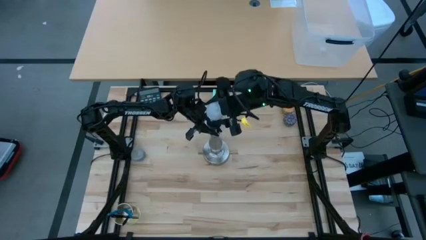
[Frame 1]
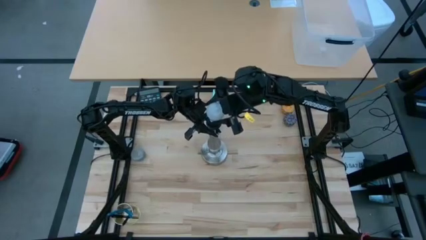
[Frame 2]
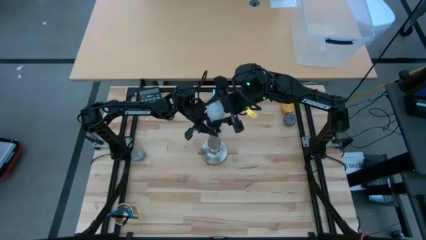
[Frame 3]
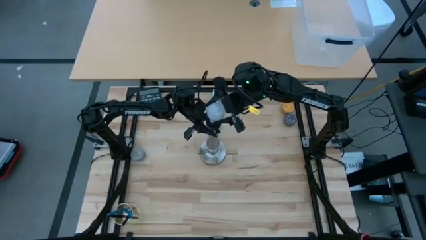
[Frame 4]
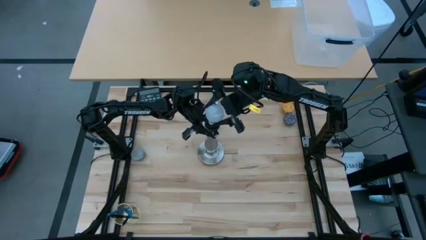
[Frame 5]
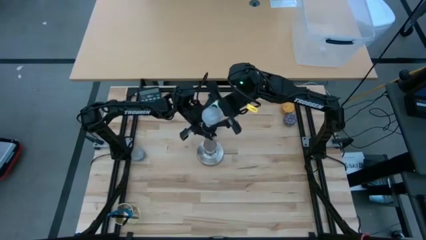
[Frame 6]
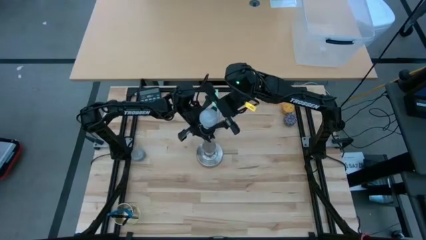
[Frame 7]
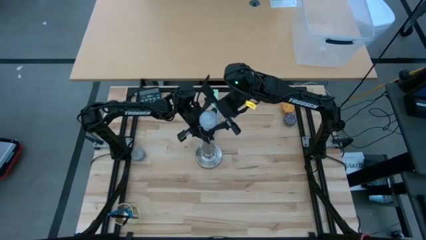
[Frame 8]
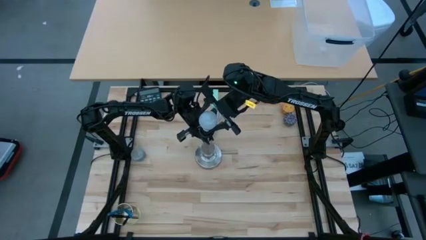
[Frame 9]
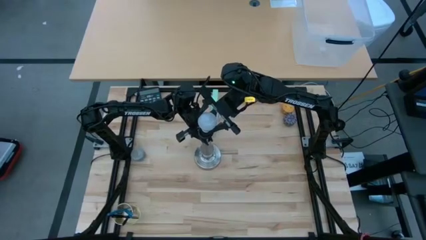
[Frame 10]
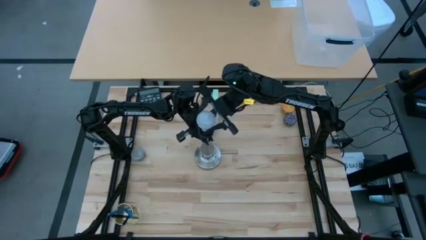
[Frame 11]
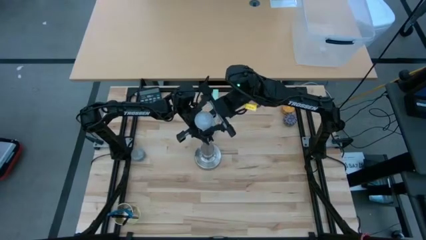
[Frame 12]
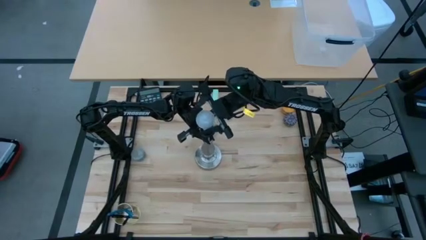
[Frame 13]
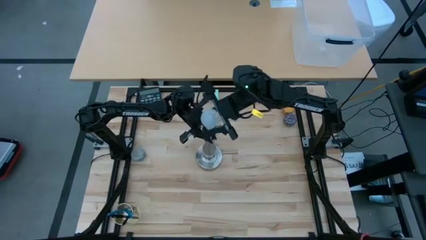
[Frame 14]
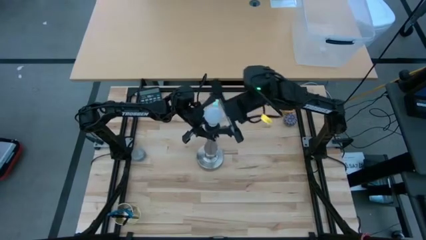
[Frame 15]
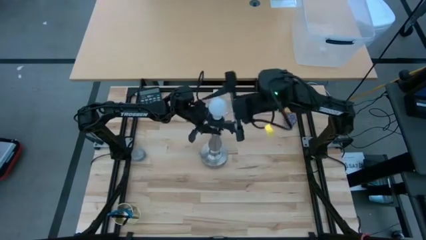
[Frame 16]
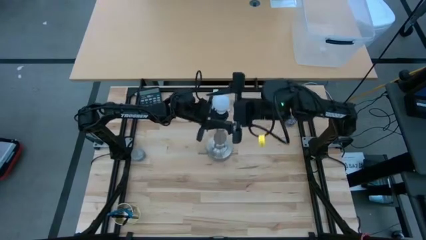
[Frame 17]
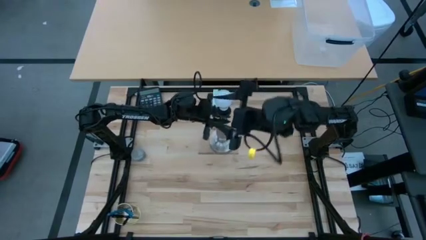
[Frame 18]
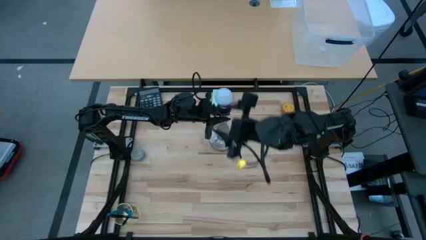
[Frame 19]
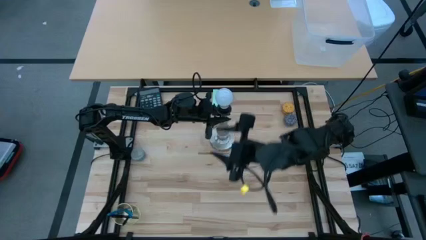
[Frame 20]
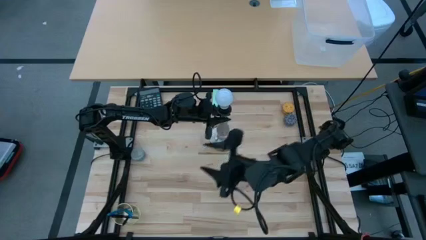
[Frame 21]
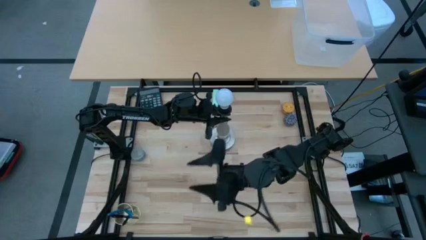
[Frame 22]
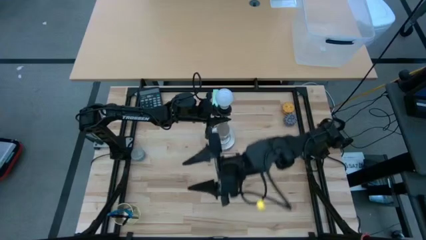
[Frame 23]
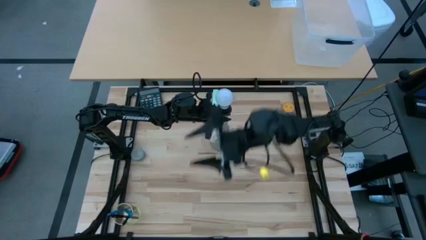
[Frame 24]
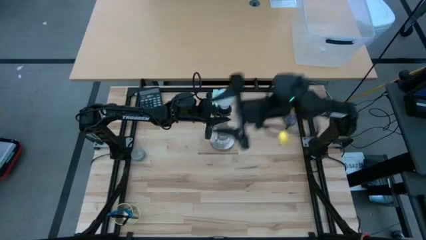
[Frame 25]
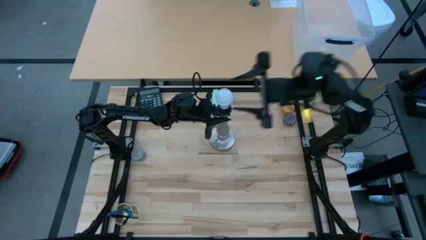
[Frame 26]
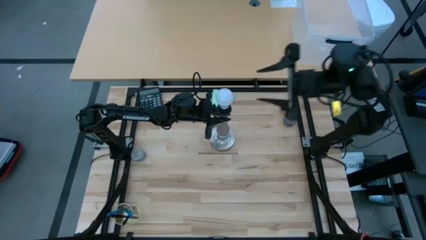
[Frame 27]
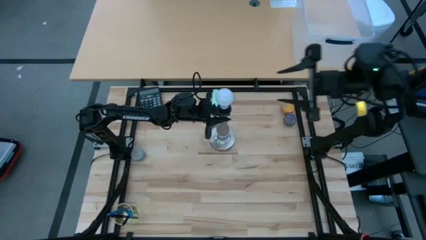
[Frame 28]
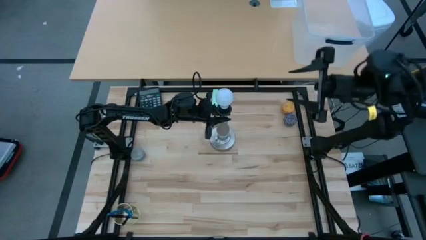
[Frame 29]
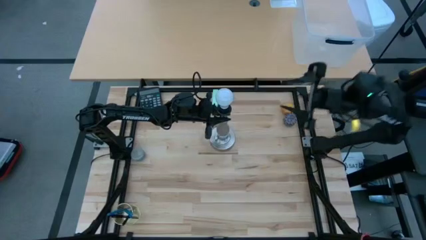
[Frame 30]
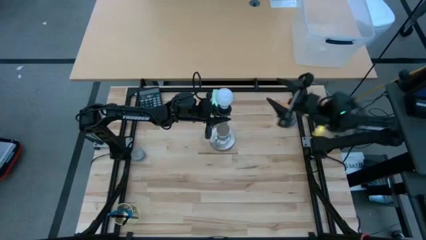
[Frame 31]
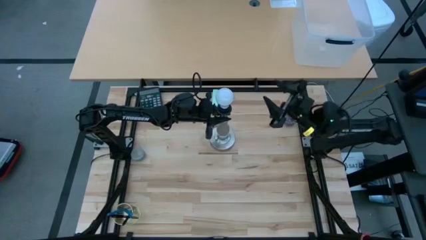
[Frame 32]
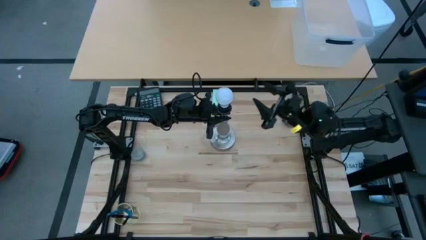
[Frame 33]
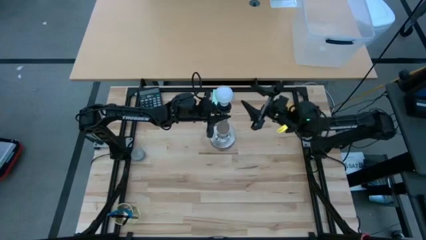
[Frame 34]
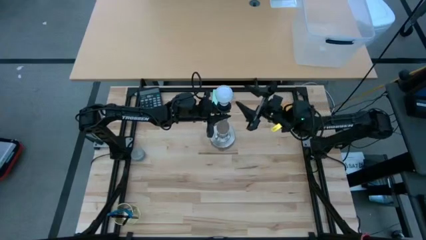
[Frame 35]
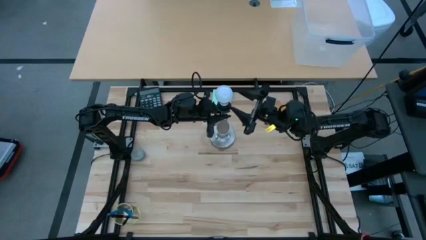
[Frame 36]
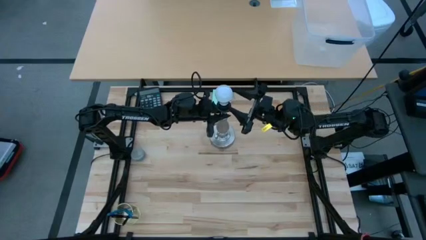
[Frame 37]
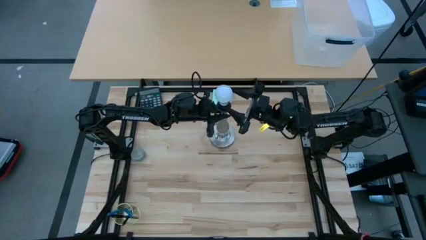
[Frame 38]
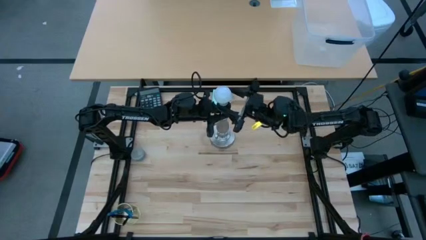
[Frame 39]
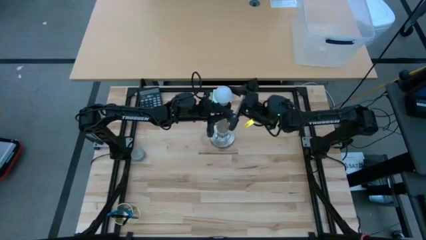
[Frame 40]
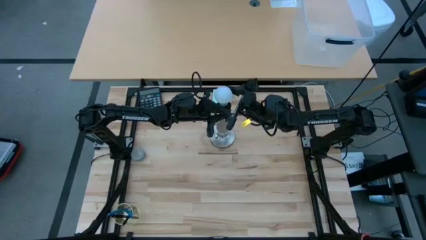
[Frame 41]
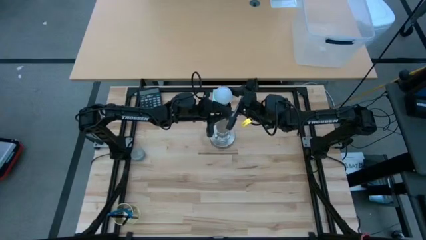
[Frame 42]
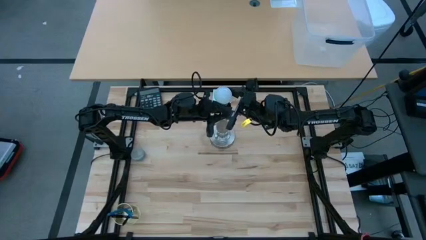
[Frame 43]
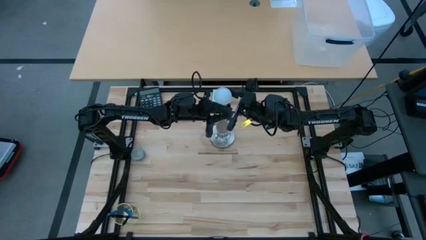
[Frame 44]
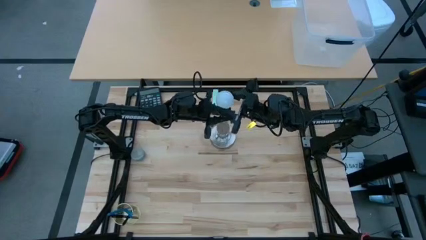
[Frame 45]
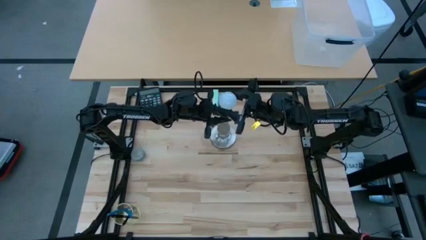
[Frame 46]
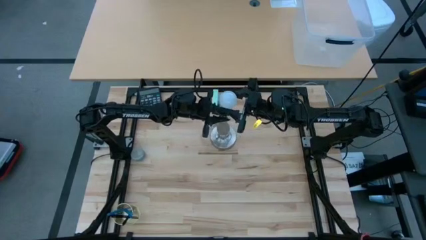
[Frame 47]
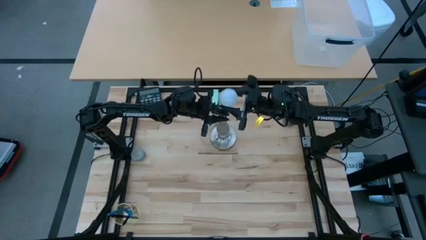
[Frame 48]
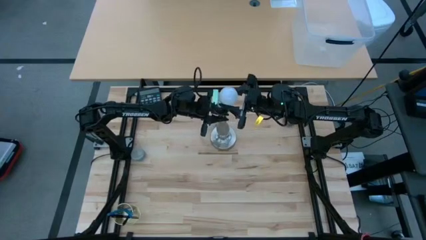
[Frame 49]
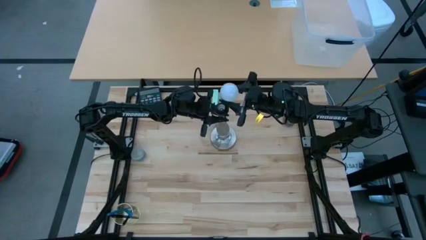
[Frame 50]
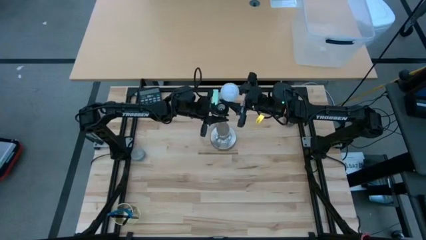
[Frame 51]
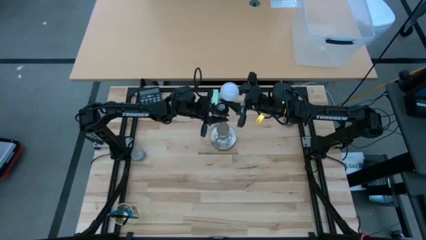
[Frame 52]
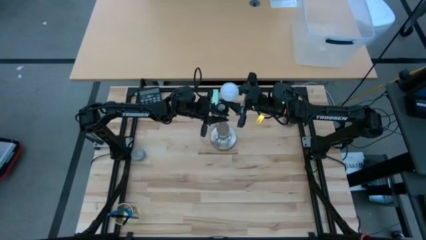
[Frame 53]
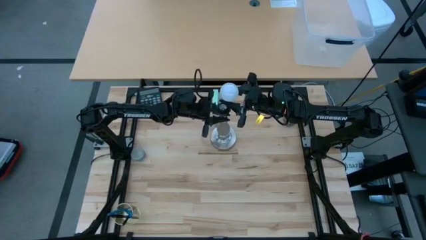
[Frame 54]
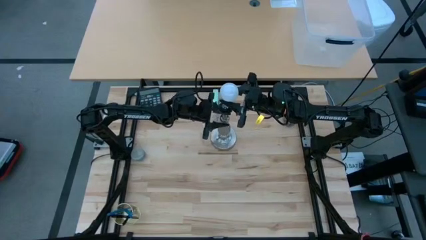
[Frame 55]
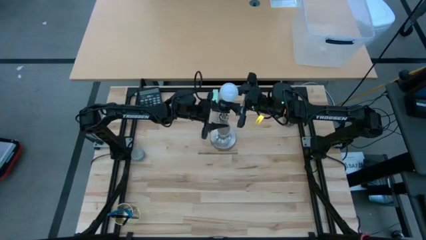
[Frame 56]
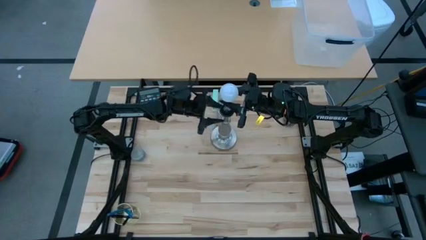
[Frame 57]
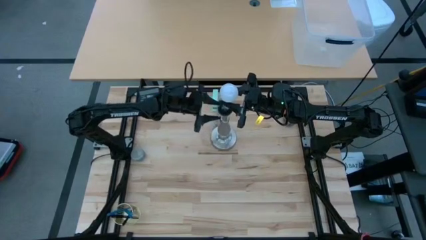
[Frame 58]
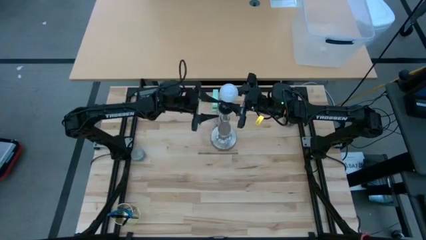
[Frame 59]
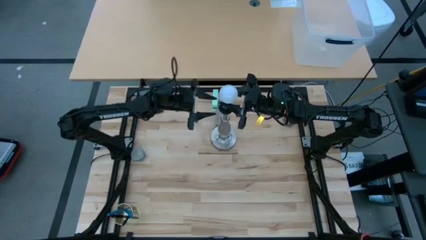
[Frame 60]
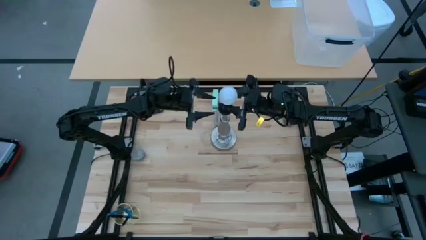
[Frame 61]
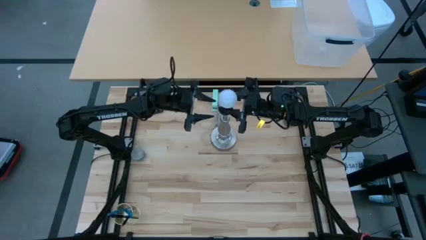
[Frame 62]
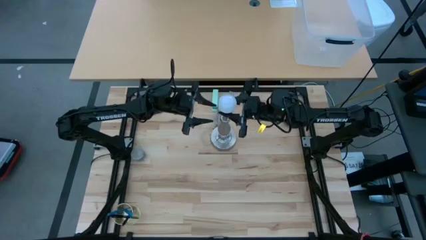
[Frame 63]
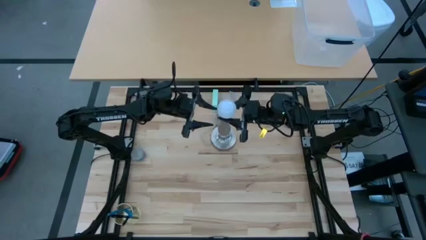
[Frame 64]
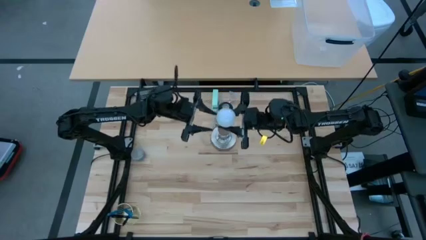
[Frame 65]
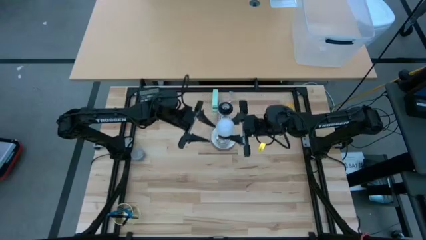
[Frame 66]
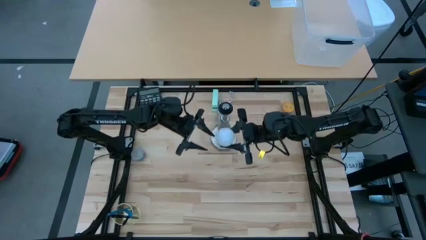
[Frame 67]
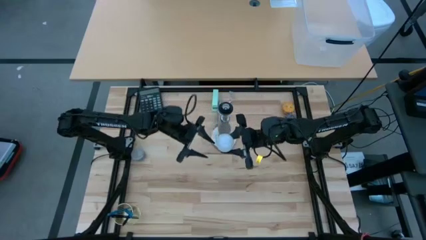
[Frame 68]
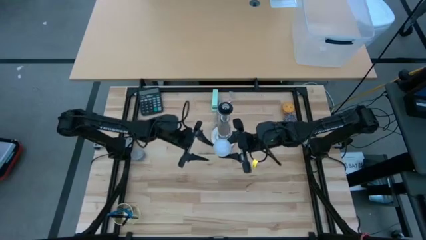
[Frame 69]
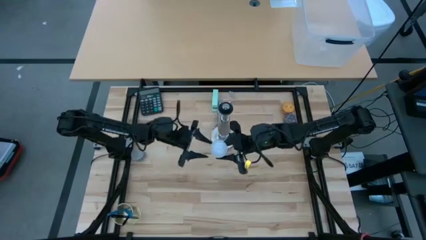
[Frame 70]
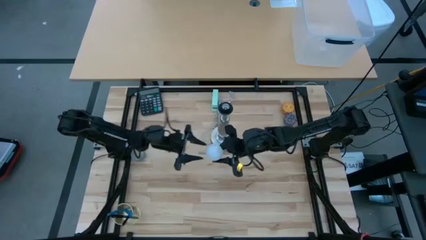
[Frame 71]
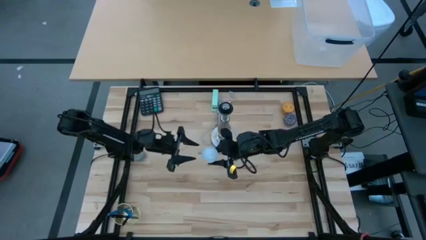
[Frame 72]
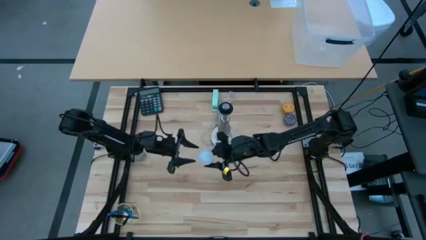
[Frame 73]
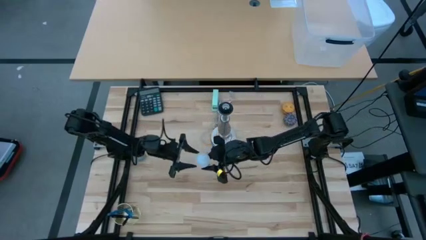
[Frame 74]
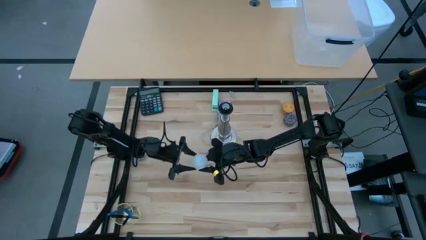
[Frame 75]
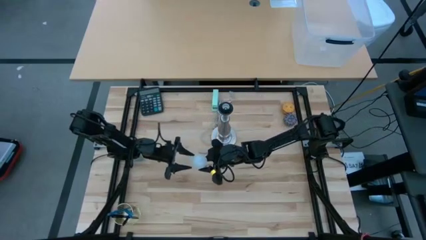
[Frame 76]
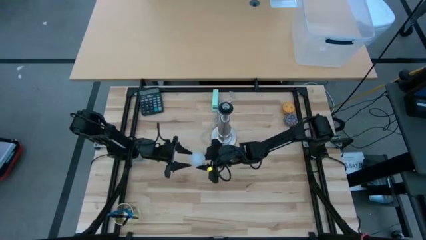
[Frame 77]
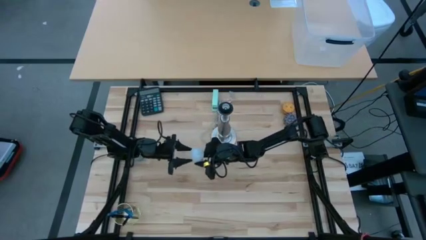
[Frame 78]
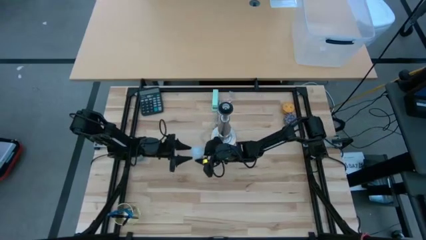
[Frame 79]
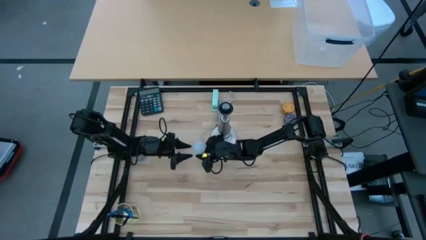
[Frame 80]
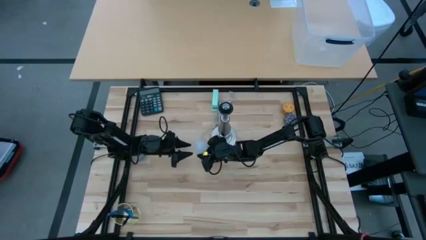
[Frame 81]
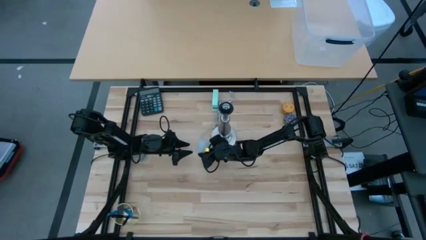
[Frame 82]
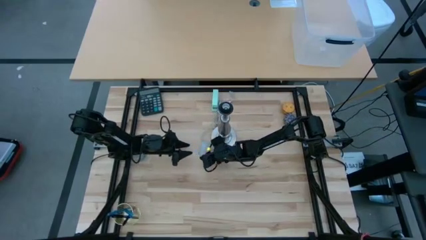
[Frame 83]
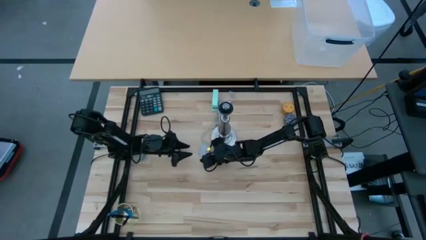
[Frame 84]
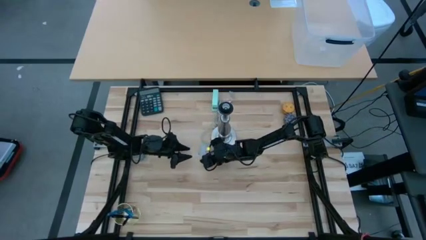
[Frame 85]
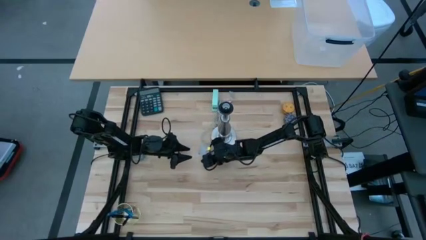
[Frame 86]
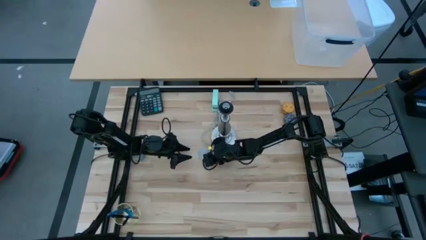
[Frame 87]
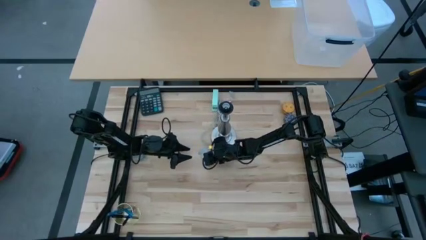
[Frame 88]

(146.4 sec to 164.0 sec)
Task: Screw lightbulb
Remove the white lightbulb from the desk lamp
